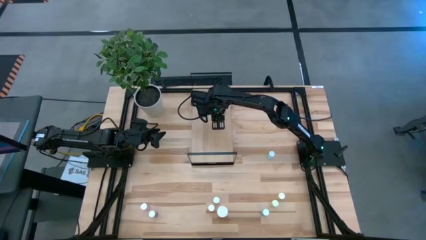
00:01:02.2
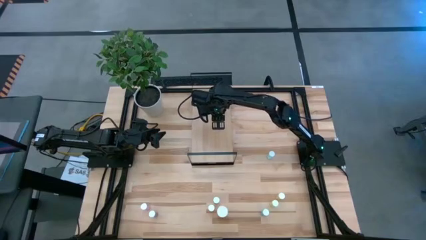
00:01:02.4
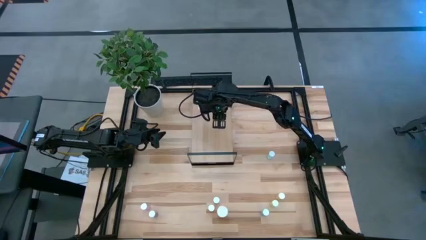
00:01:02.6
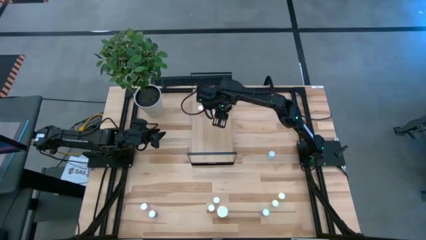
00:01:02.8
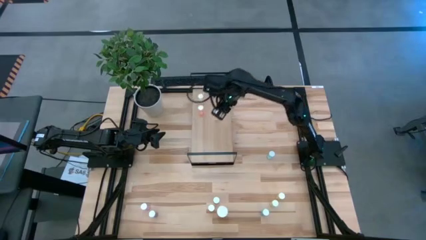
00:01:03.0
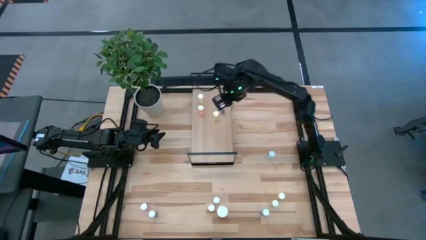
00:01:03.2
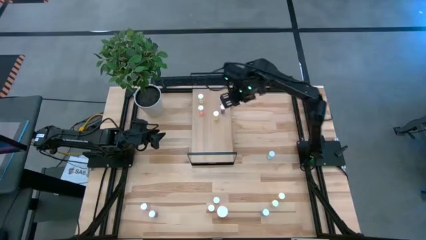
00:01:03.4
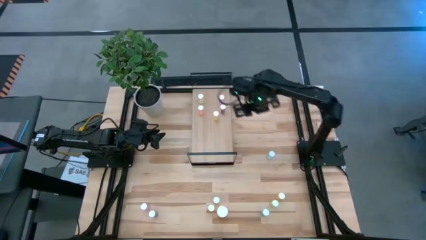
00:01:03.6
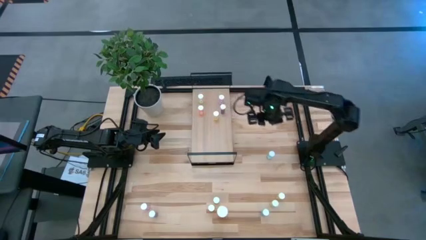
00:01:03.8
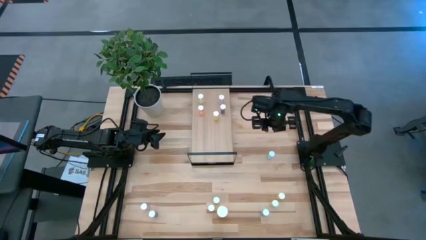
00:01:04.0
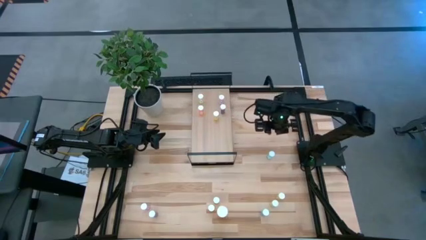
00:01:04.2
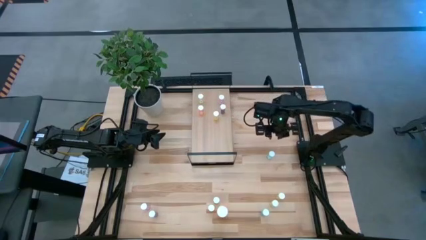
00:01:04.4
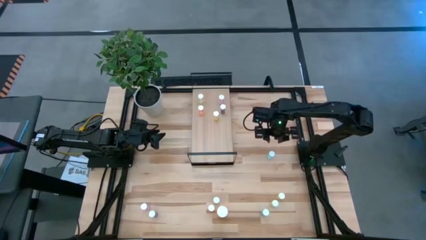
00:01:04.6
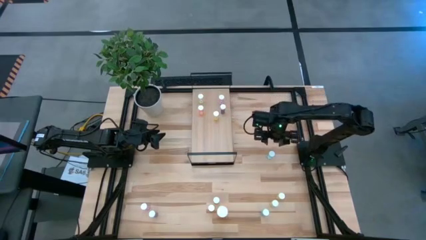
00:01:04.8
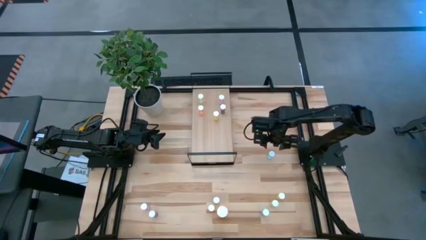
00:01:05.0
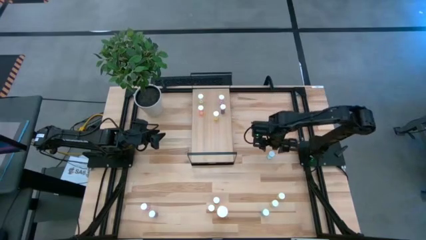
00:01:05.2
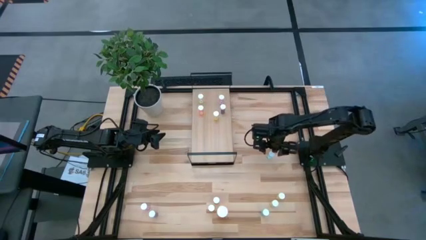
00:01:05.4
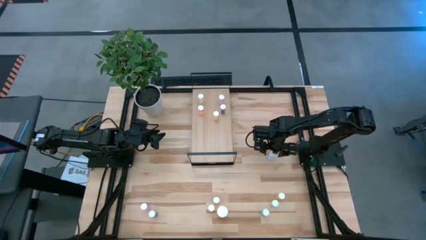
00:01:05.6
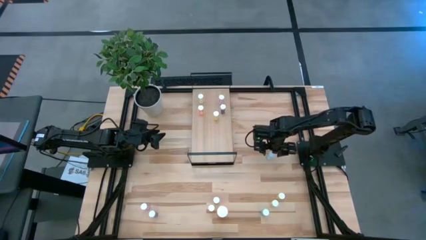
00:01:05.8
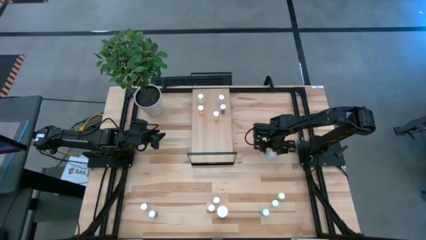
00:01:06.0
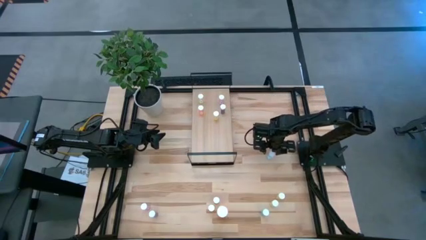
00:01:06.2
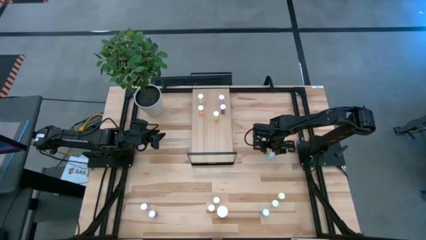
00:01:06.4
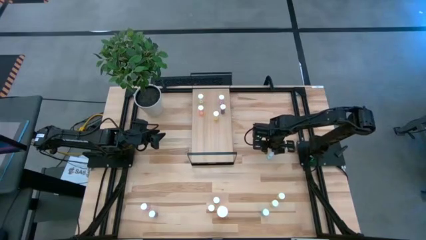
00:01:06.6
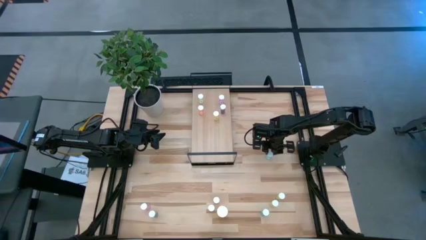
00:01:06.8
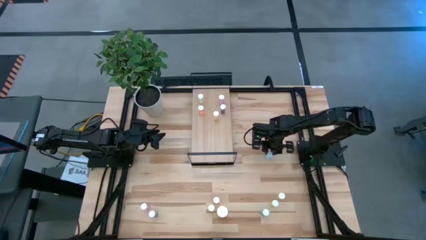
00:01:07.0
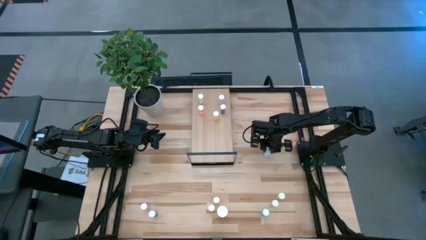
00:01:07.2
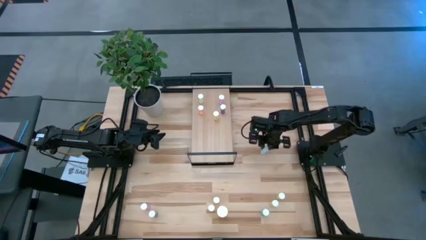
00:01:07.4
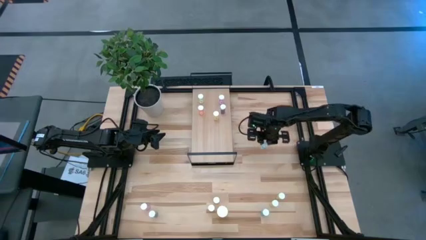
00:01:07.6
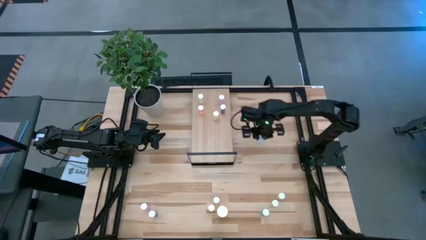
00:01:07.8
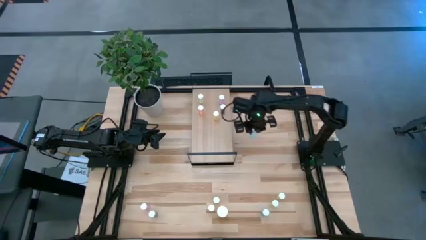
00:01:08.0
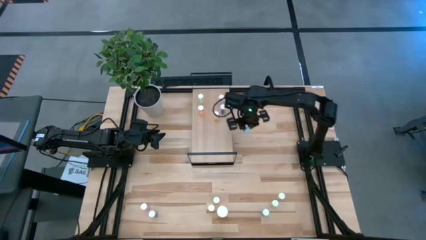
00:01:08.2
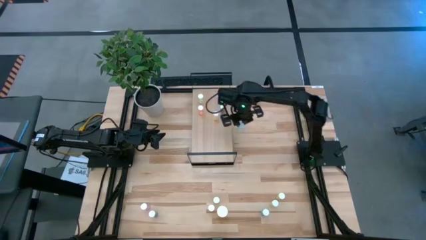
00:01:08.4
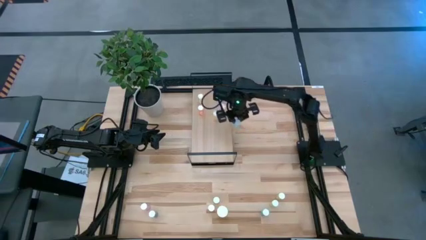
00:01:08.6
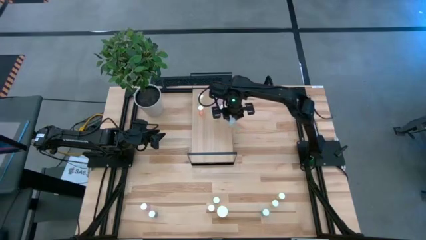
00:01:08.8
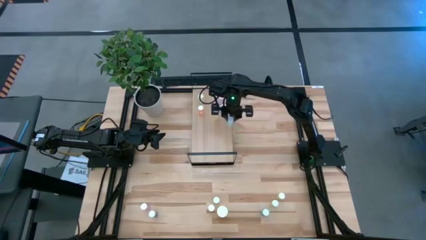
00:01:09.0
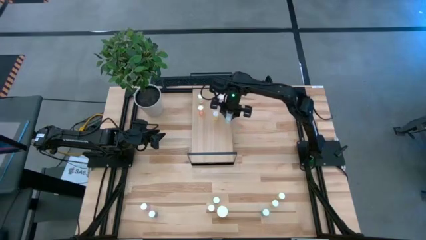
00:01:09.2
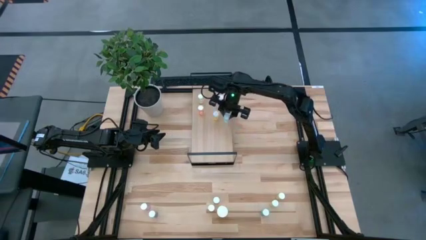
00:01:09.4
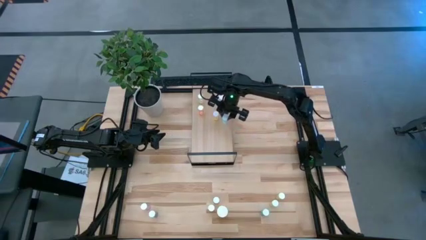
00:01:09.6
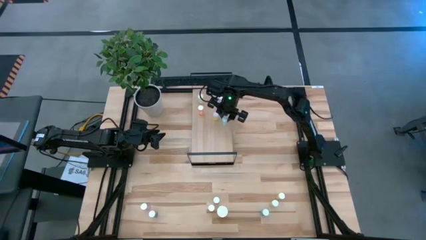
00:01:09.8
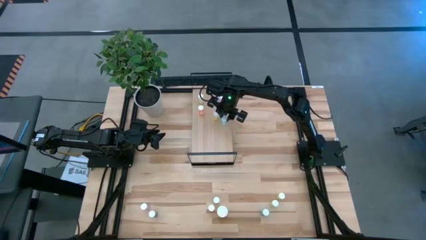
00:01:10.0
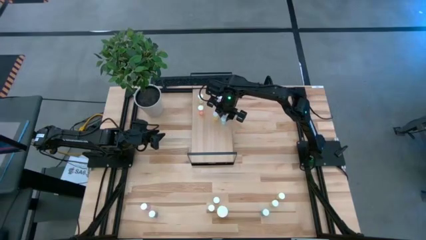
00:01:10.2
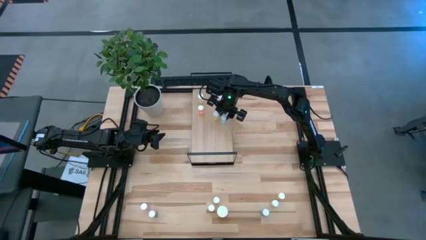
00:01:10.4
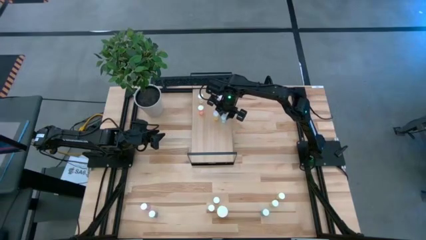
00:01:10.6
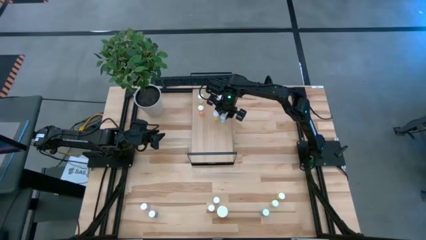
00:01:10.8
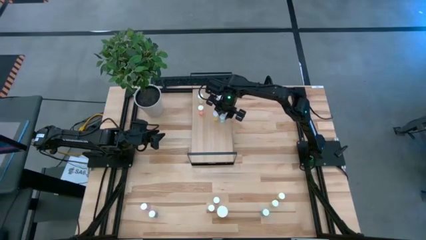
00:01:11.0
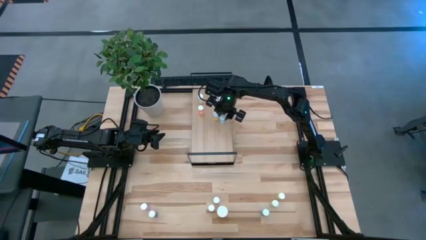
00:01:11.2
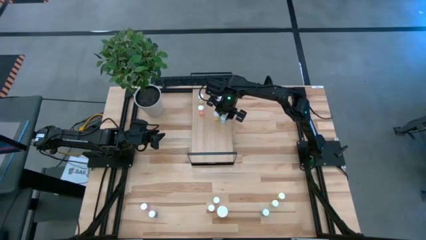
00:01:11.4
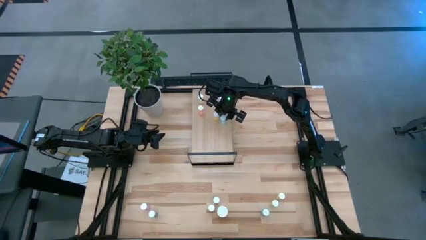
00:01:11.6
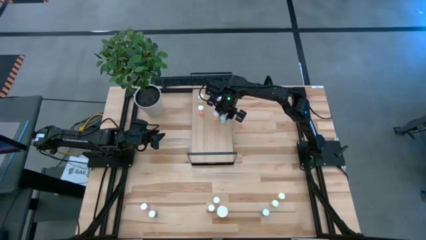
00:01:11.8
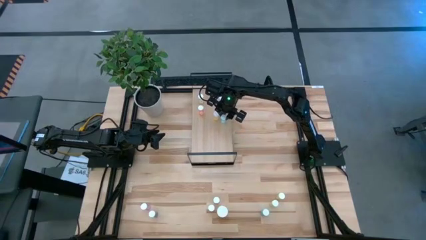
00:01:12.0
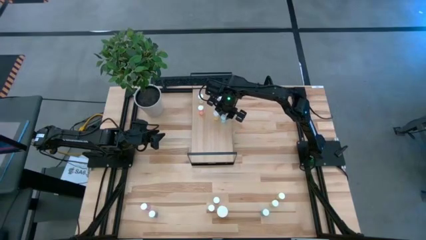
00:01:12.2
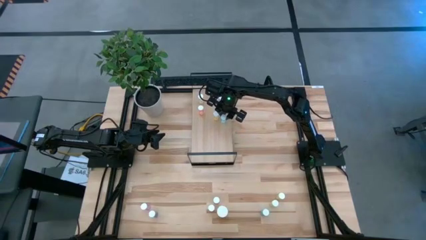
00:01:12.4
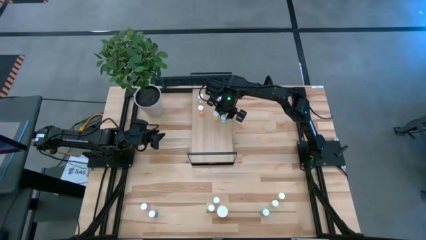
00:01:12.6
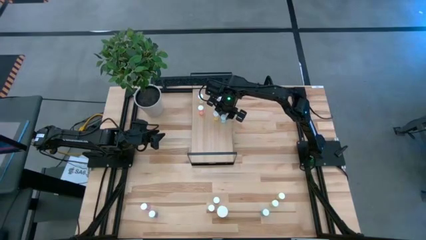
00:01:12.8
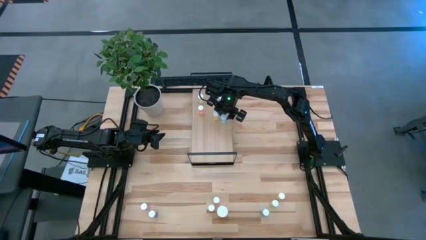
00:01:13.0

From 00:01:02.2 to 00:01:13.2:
Task: Pick and place medicine bottles onto shelf by color
Put the green pill bottle on the shelf
